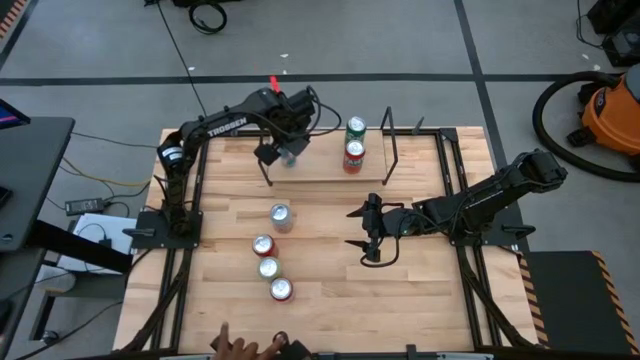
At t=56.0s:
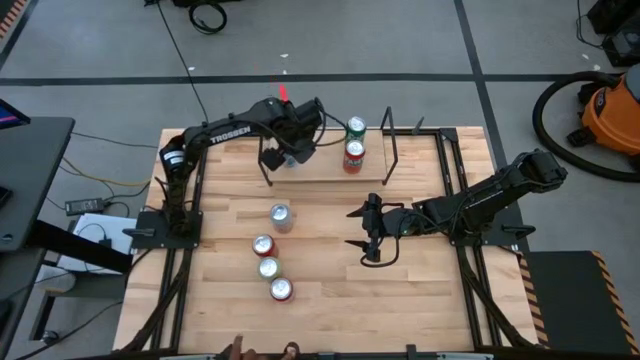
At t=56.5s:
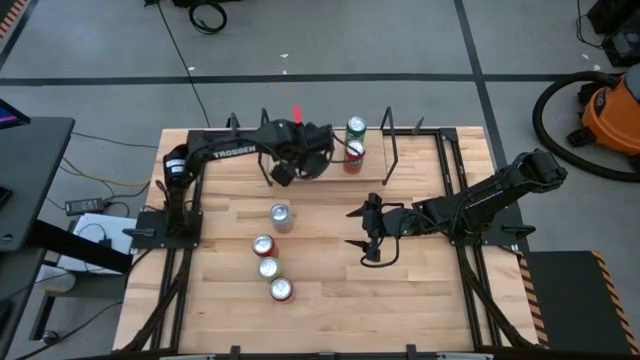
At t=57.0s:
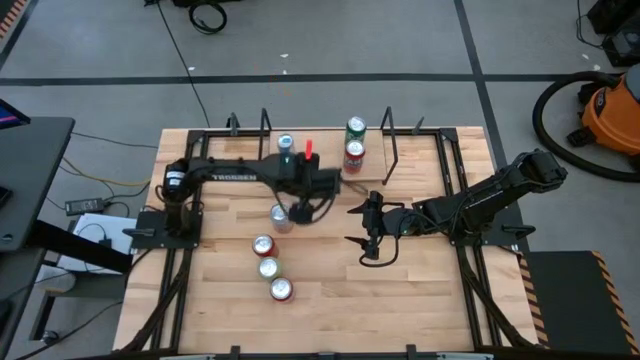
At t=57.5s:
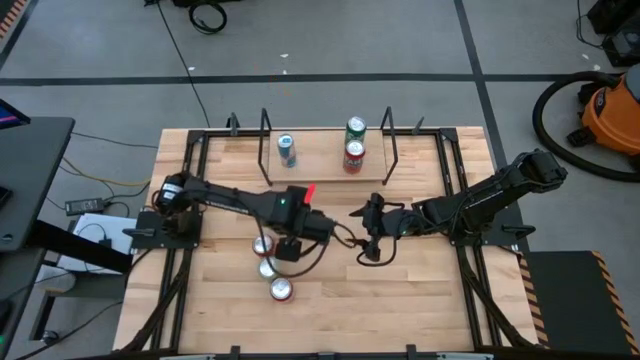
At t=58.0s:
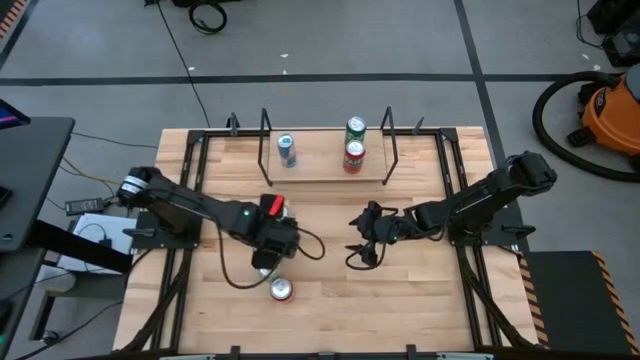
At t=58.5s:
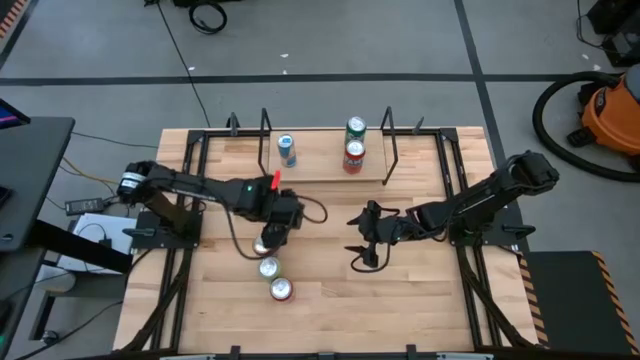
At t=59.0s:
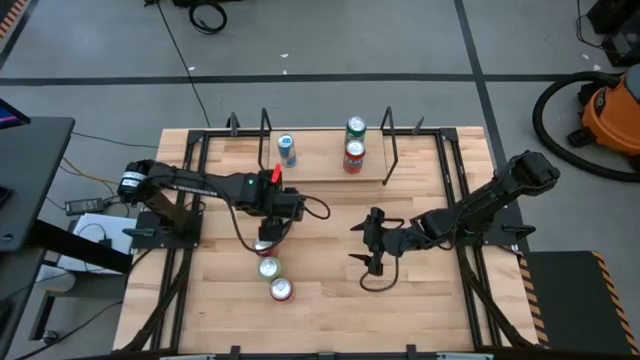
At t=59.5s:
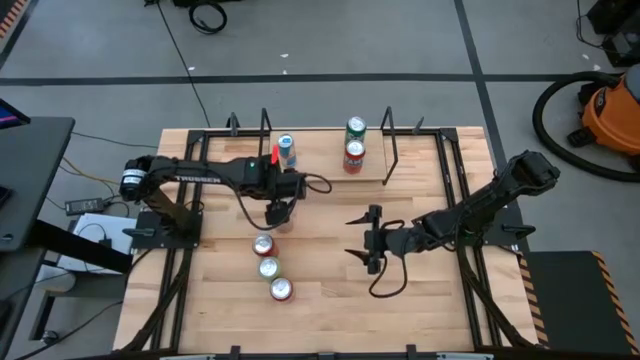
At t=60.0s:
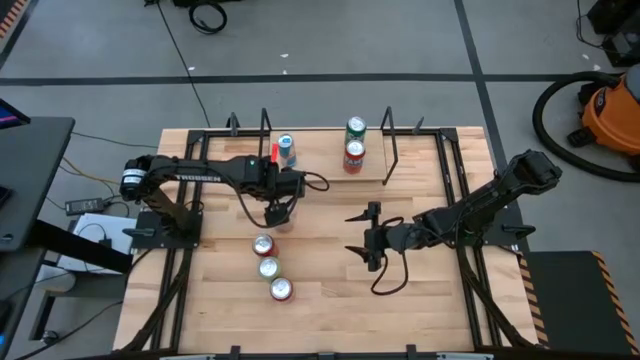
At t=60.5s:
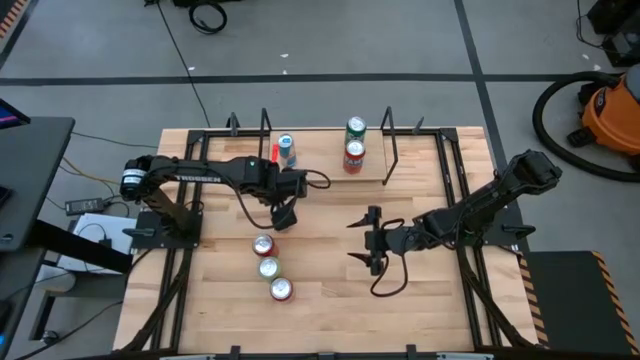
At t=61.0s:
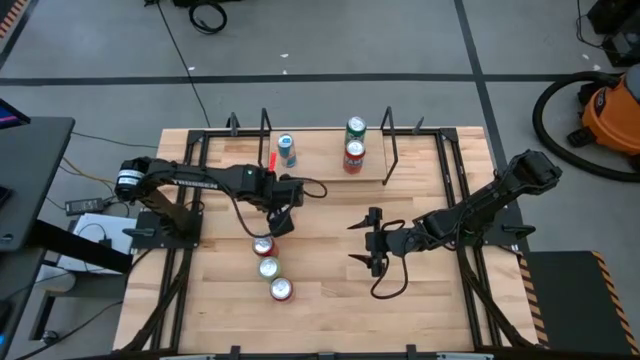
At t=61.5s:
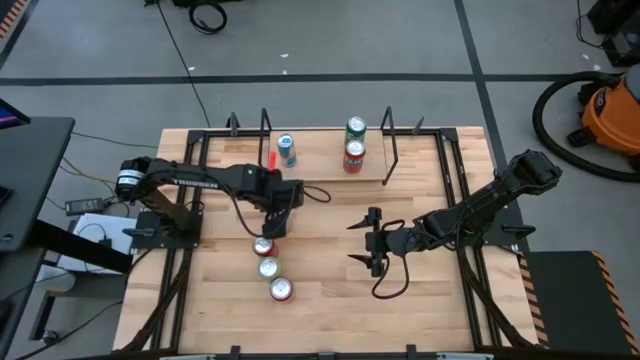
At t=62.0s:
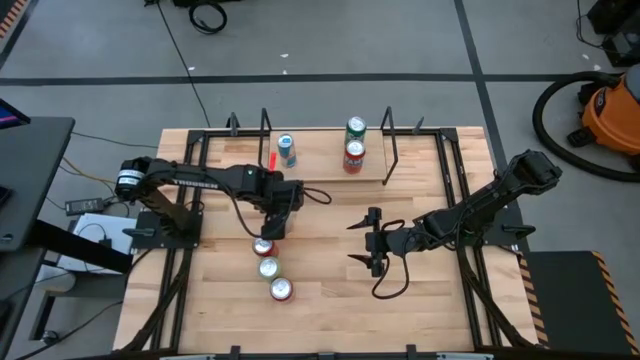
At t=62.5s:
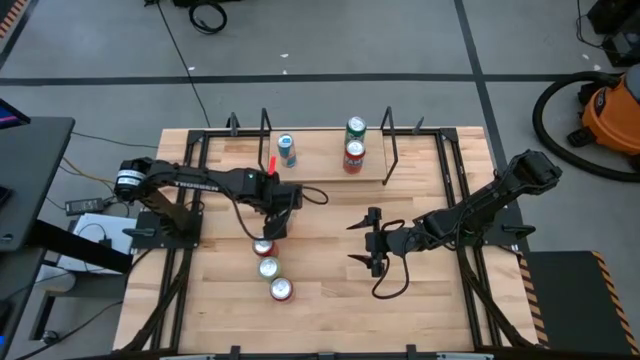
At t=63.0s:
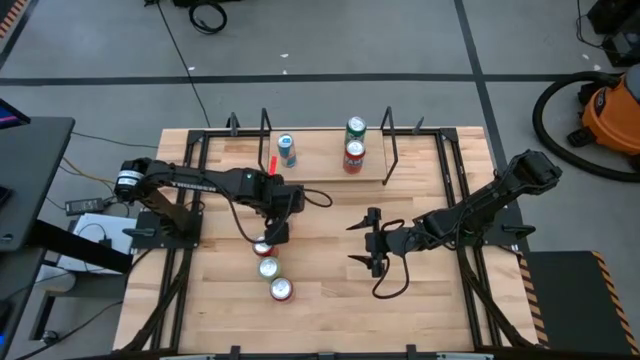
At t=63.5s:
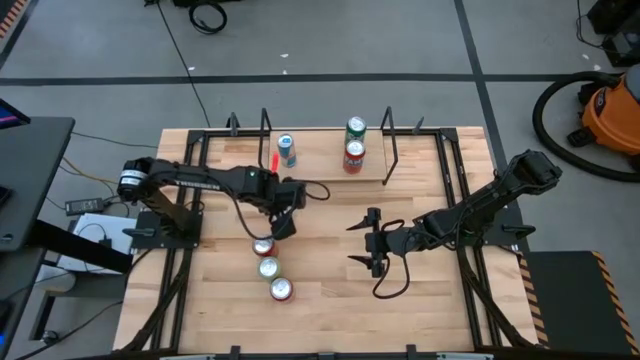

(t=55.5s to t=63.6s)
Task: Place canned beverage on shelf
Put the white-orange soda can on the shelf
